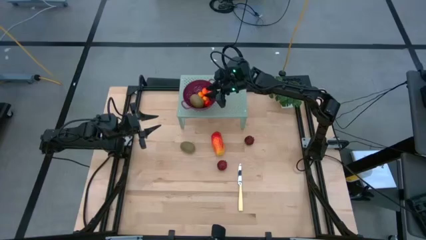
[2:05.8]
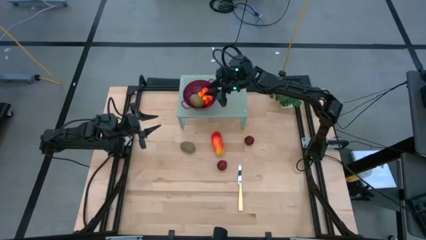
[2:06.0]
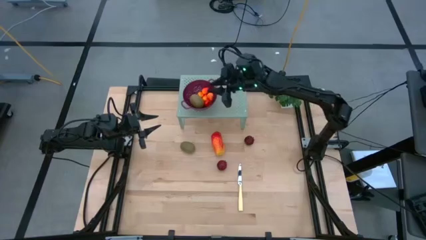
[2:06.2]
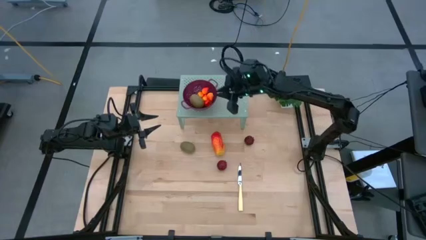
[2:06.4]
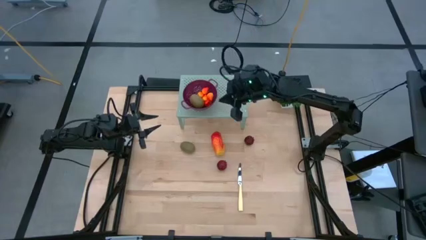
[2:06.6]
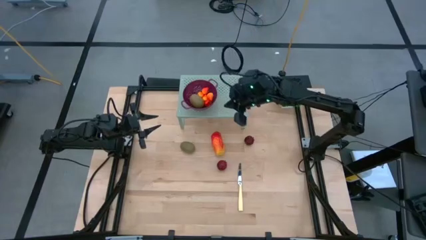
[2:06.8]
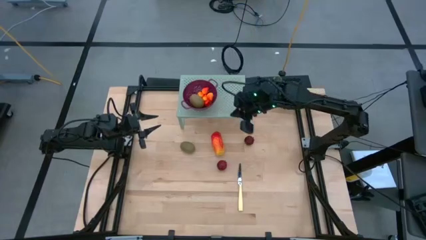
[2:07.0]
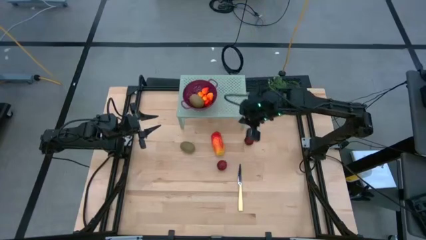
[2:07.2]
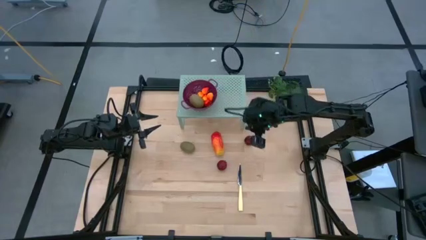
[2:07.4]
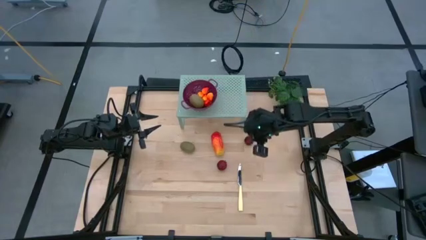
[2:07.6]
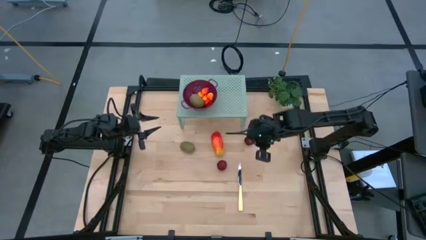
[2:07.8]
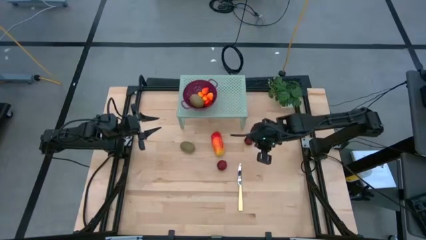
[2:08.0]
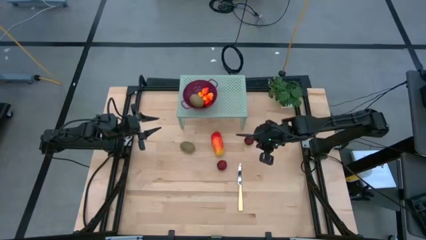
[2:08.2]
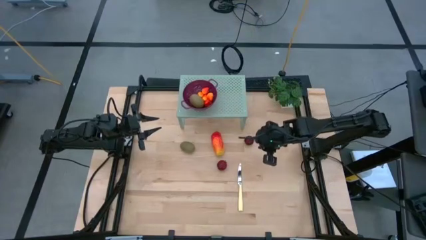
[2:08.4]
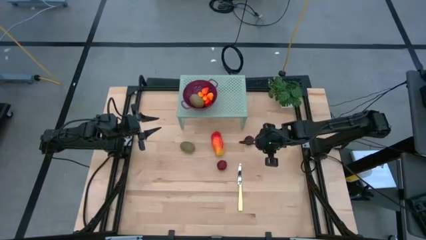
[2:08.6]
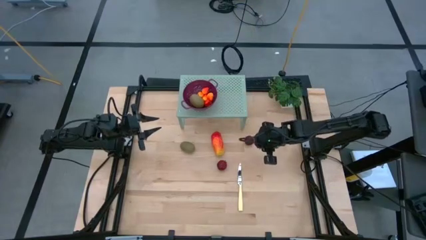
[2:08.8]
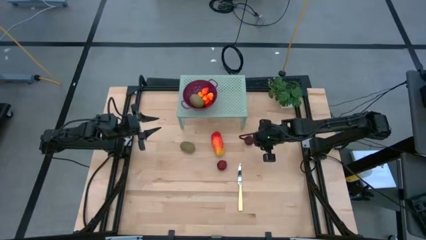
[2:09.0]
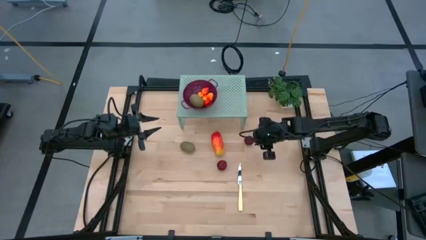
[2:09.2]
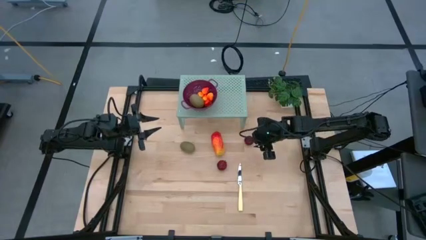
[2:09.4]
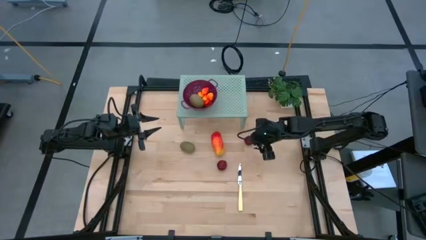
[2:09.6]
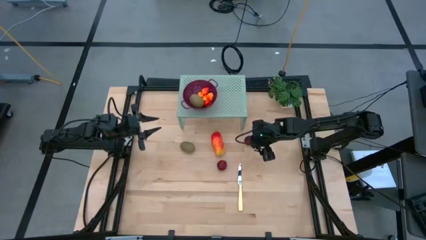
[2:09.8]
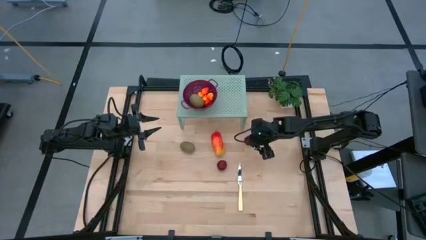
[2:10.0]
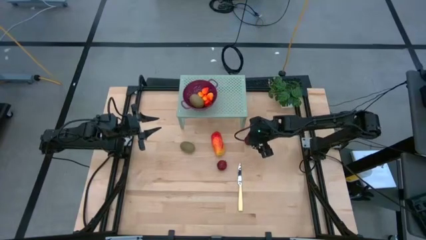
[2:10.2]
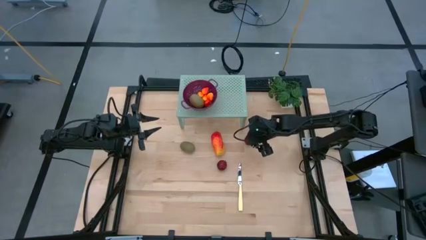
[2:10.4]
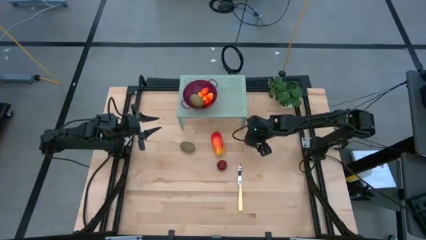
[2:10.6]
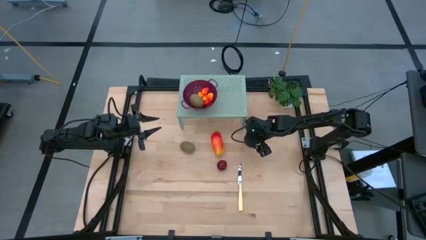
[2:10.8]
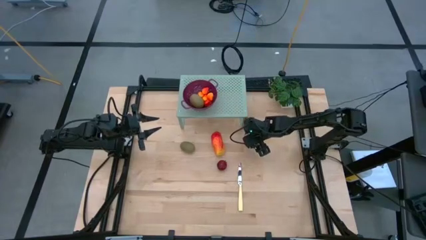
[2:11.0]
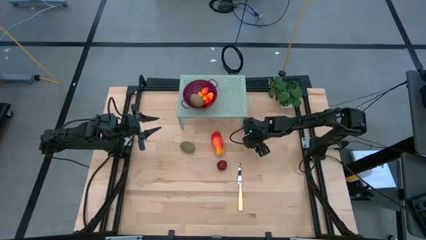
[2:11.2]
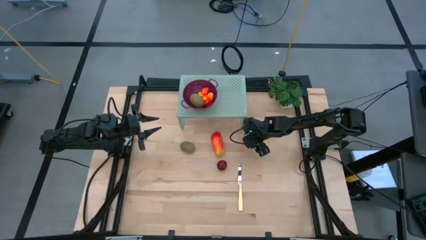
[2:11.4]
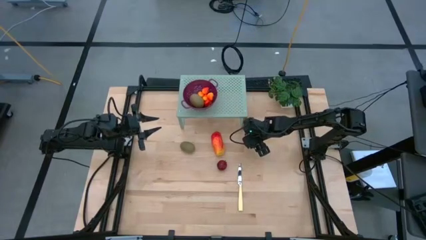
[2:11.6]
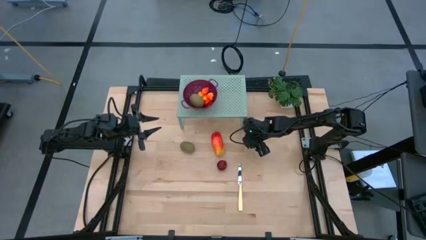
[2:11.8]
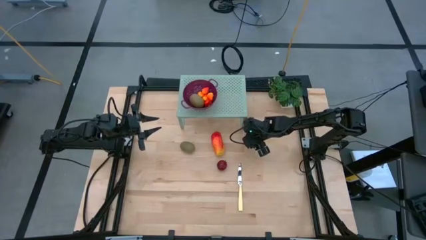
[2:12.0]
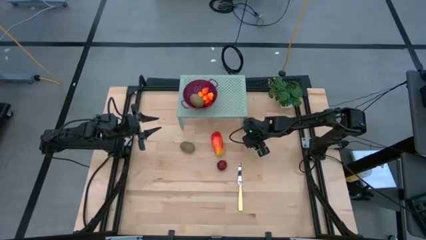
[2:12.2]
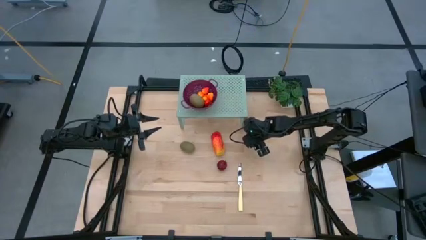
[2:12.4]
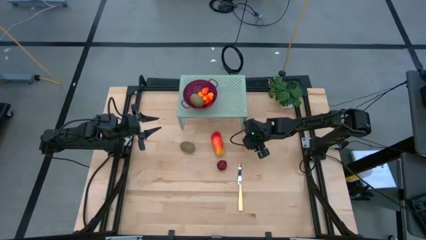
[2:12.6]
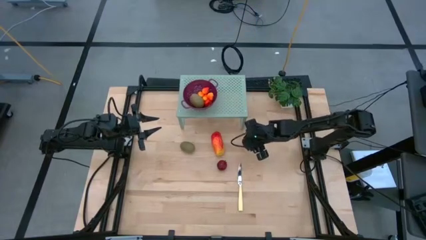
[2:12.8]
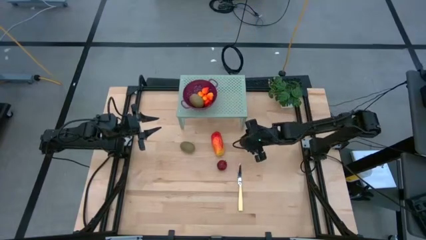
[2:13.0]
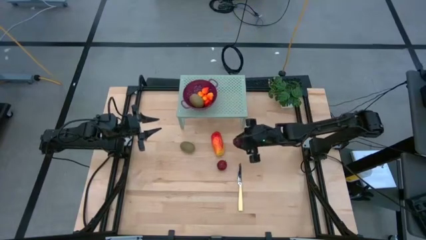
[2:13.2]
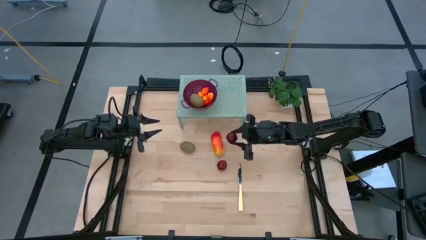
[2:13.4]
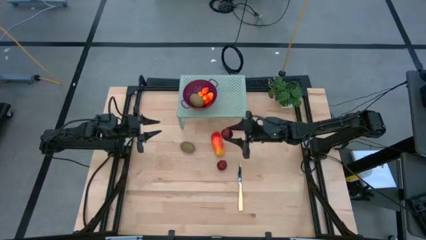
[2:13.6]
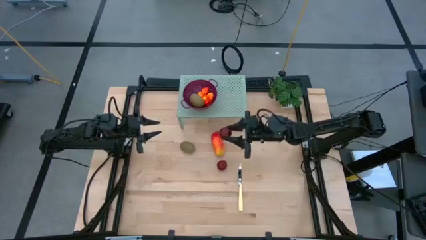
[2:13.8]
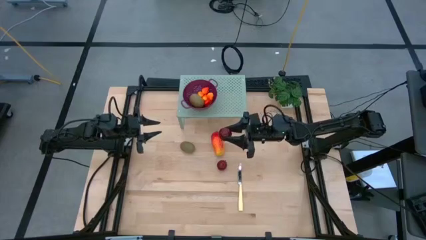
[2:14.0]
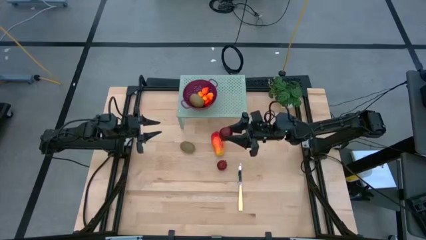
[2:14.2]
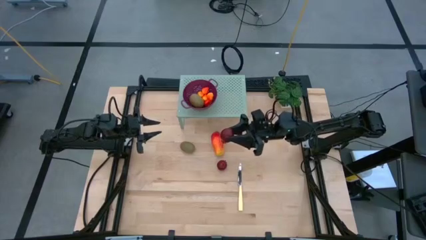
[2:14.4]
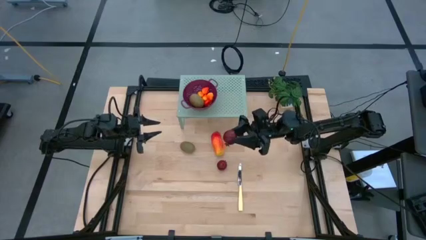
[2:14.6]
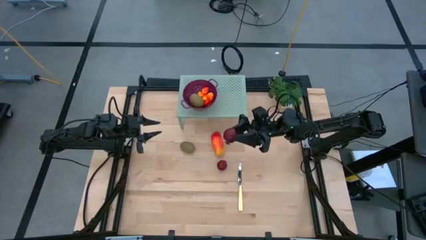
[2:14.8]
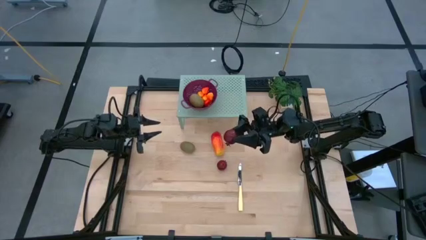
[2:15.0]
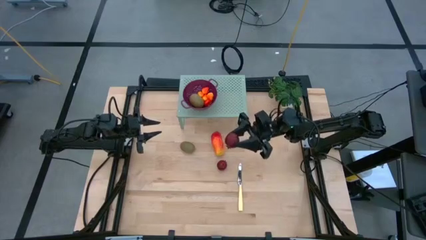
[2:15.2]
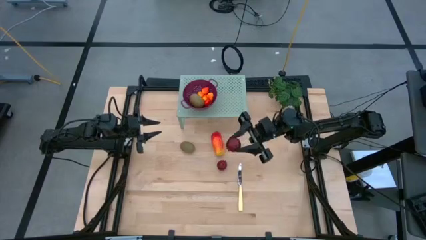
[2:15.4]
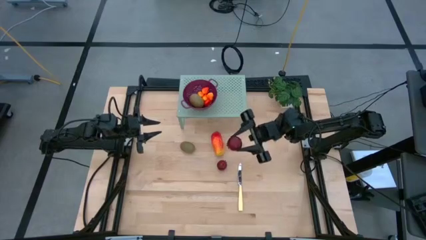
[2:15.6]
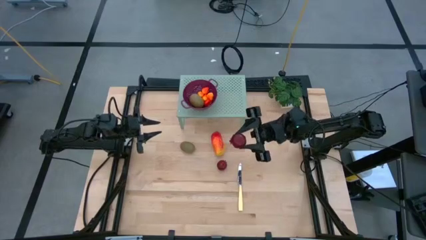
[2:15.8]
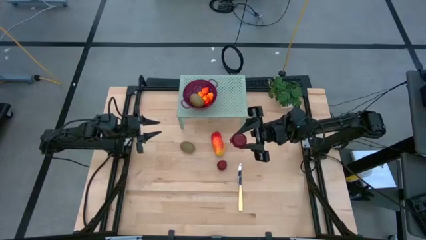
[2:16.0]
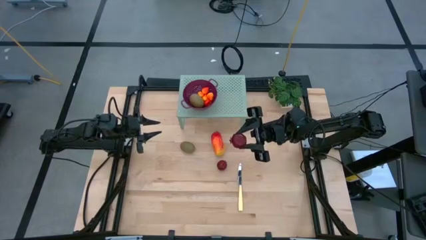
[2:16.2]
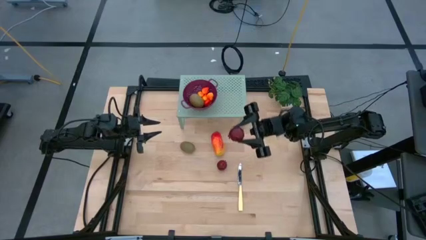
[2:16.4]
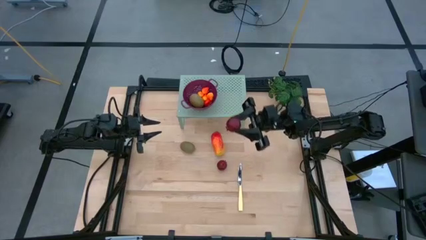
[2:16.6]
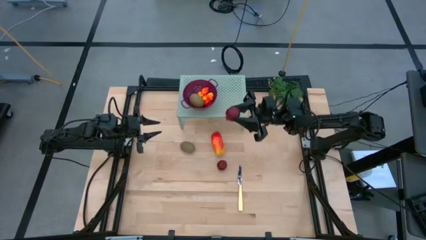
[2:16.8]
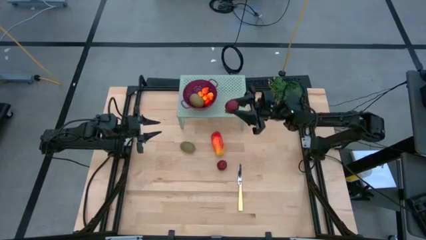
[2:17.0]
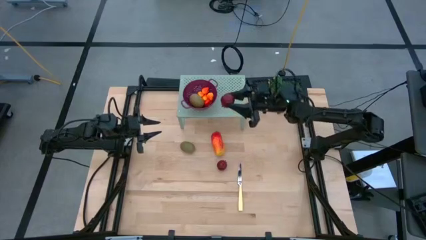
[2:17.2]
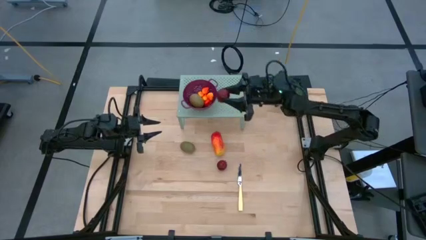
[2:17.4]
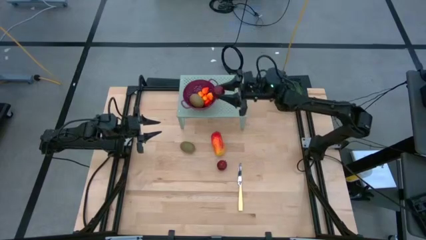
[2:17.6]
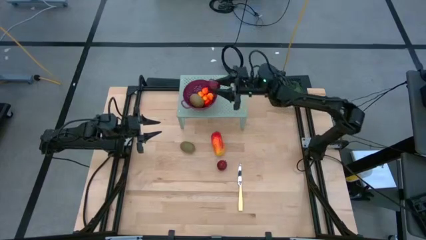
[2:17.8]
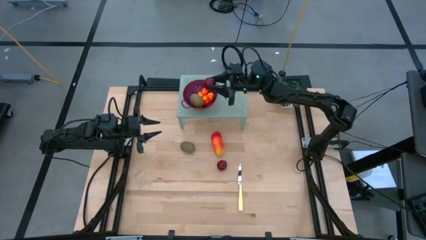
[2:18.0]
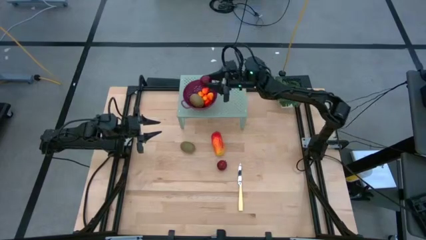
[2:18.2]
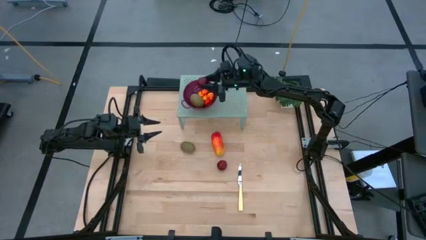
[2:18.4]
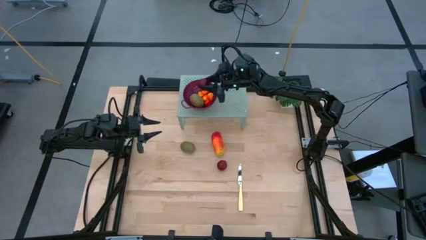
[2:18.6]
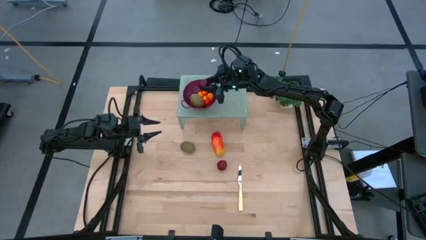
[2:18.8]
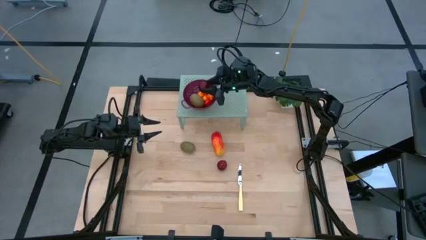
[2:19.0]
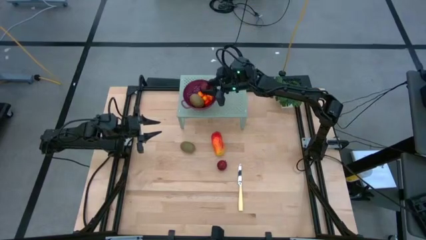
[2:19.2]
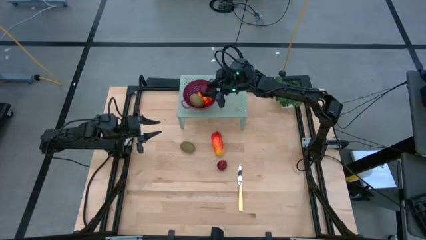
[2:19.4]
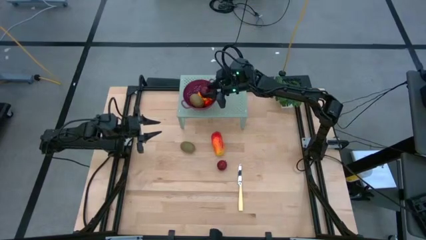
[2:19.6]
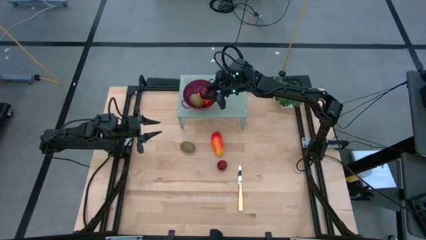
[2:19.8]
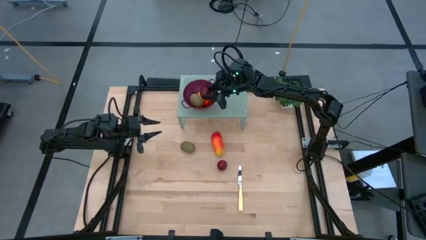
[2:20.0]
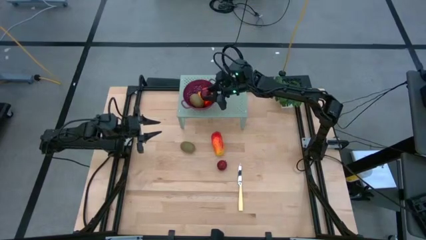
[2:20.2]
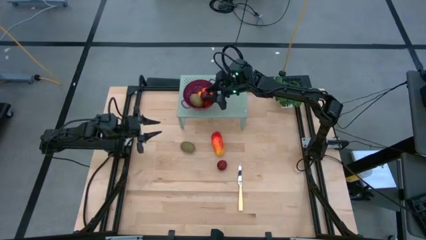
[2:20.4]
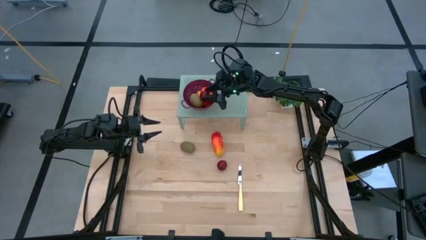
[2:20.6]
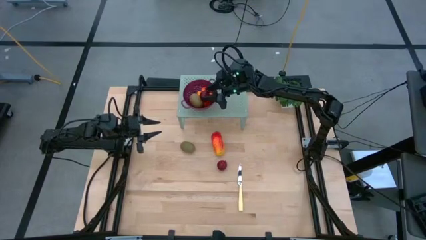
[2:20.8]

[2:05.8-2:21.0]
Task: Pick & Place Fruit
Put the pomegranate into violet strainer bowl on the shelf
